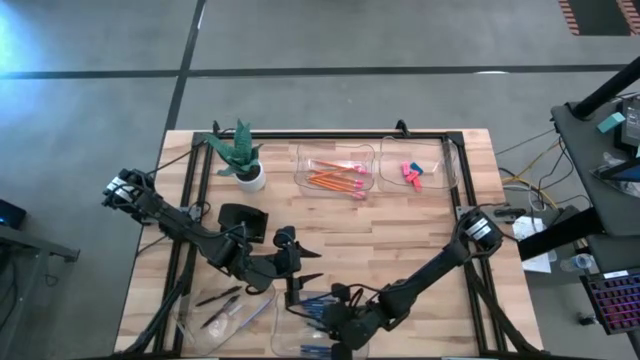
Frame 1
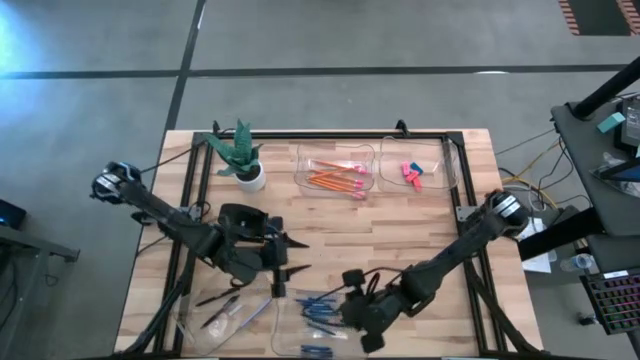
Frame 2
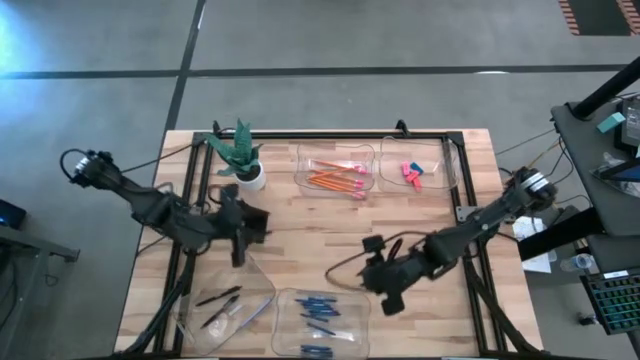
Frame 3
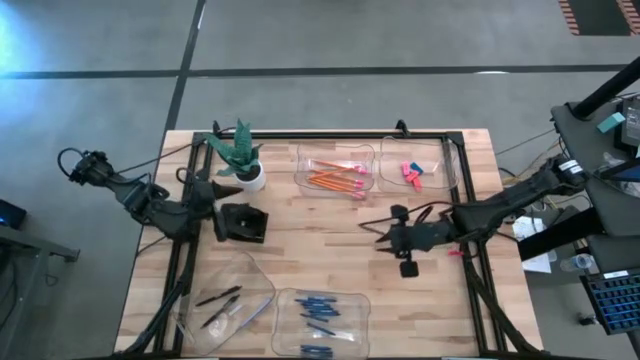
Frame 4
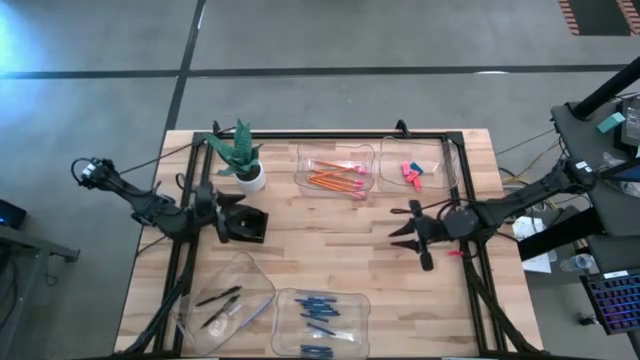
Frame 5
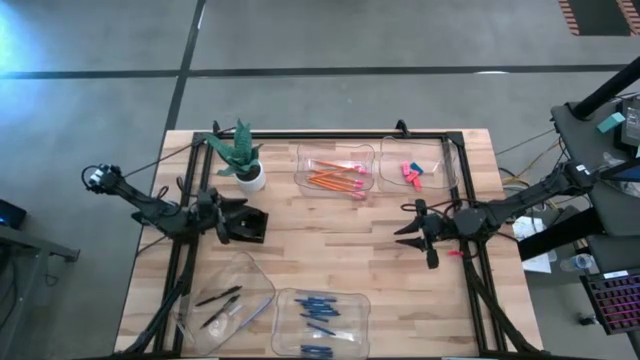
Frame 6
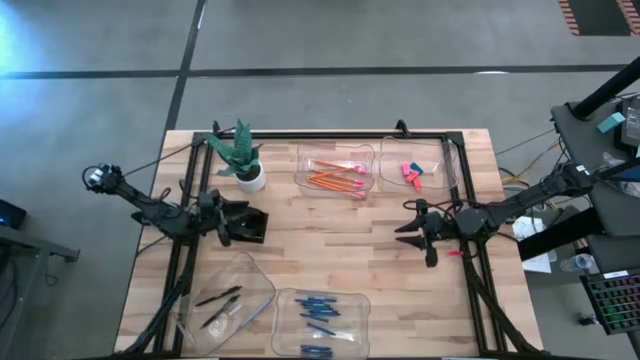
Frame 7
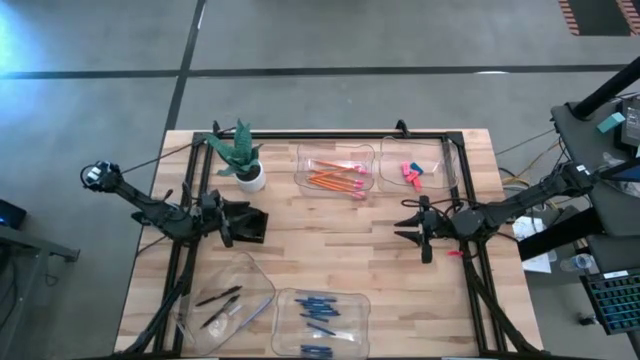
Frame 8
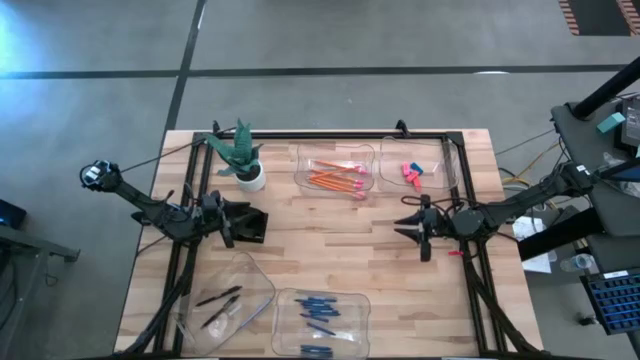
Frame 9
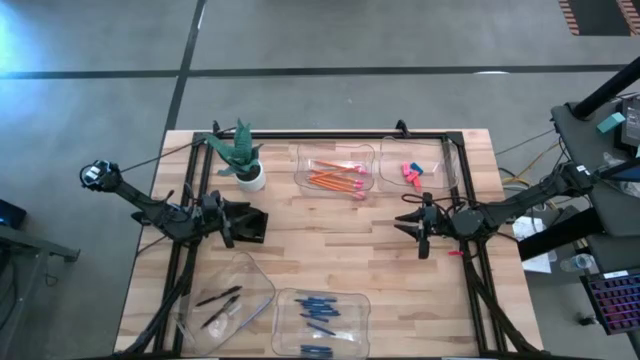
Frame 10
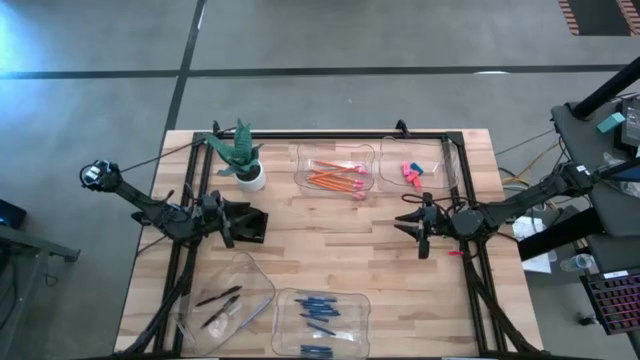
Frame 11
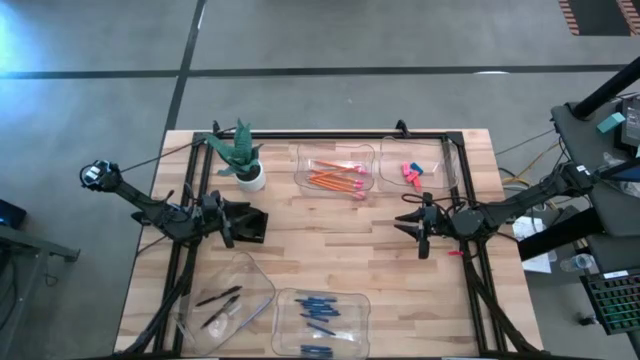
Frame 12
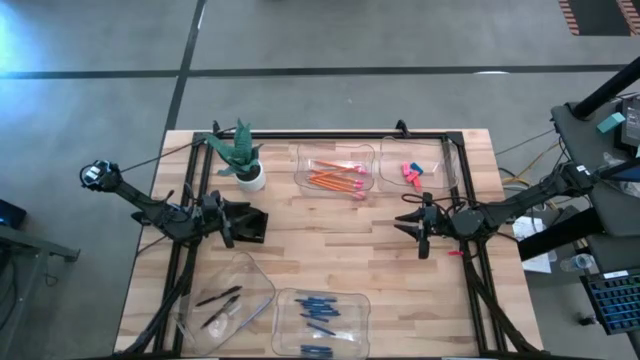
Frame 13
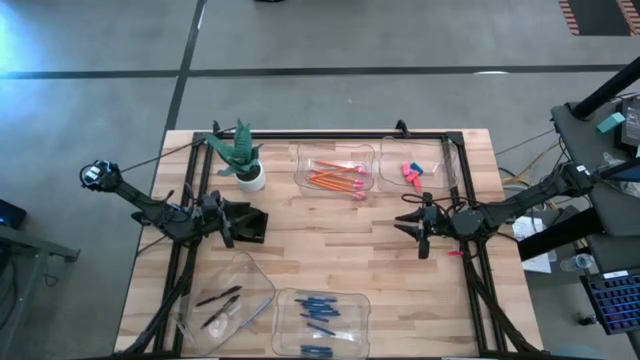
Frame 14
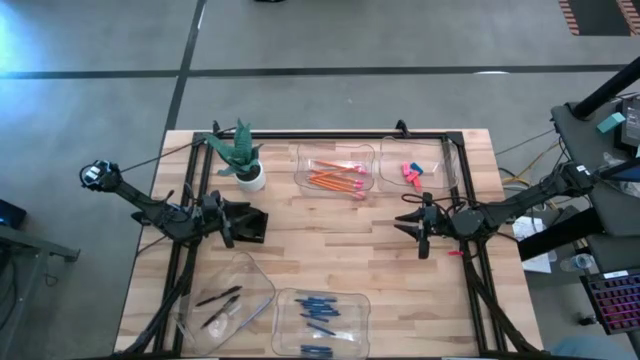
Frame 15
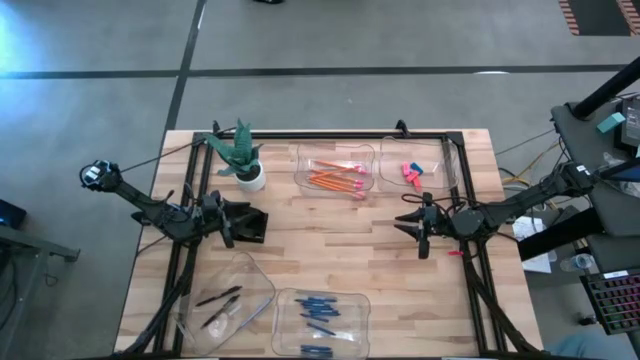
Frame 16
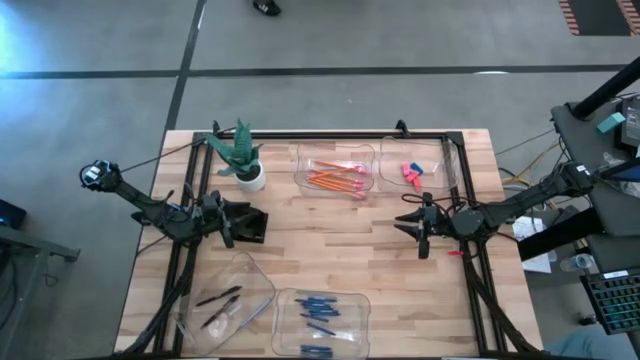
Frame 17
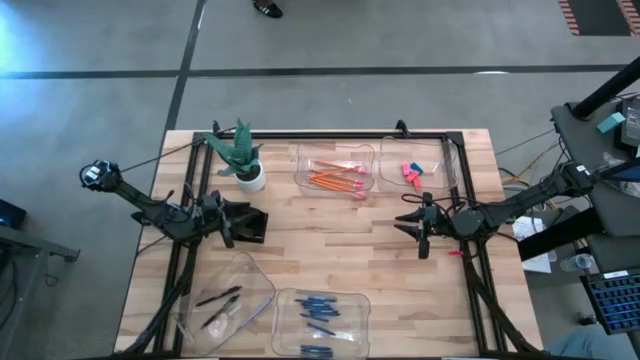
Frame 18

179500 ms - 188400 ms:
Task: Sort crayons/erasers/pens/pencils in bins
Return to Home Position

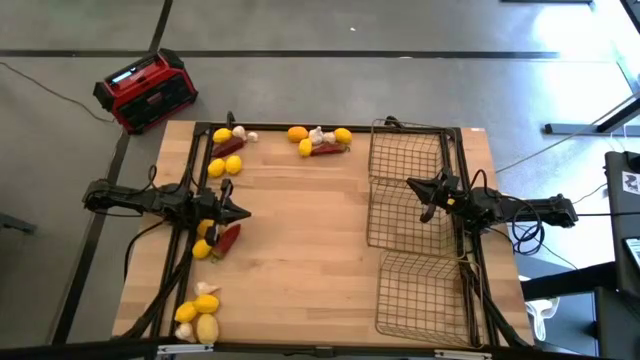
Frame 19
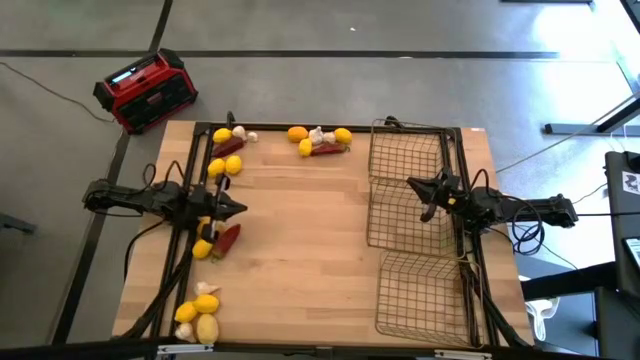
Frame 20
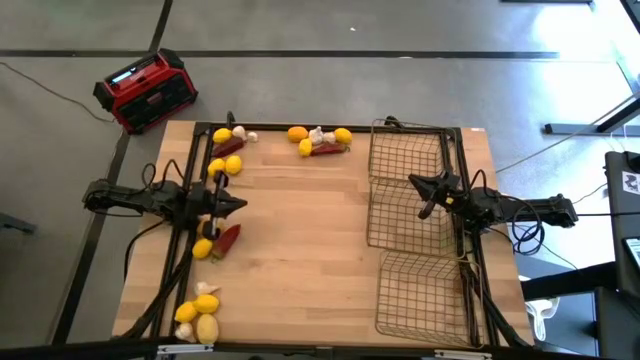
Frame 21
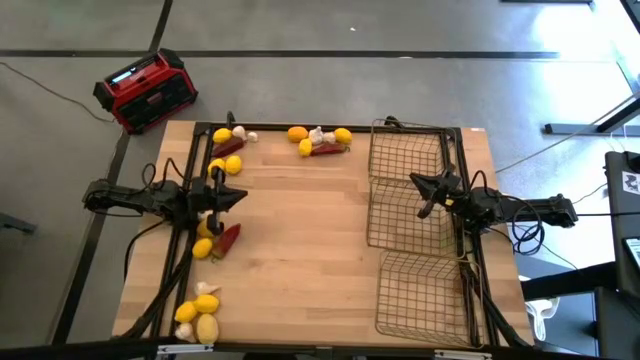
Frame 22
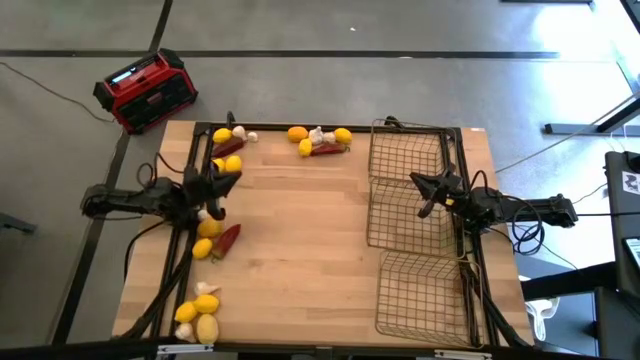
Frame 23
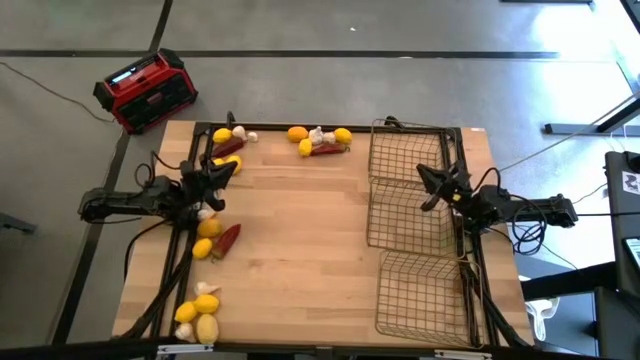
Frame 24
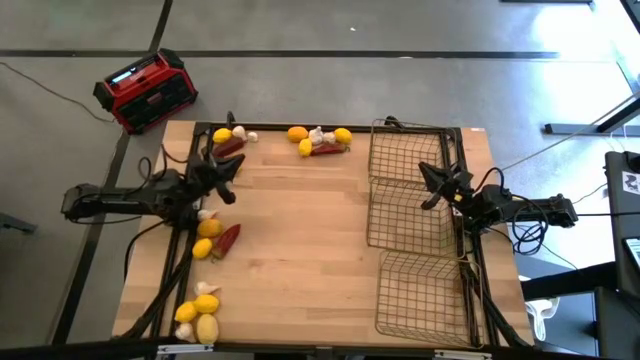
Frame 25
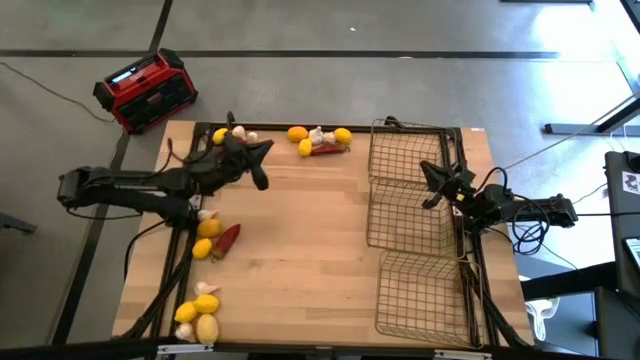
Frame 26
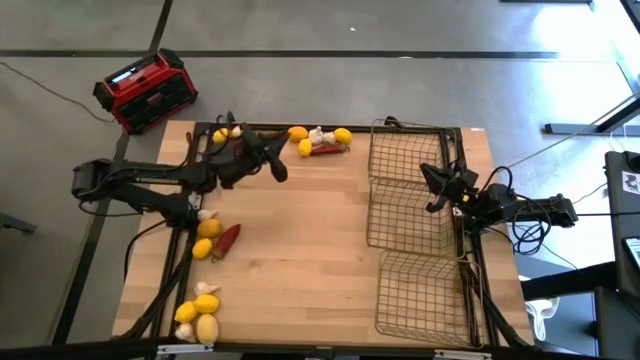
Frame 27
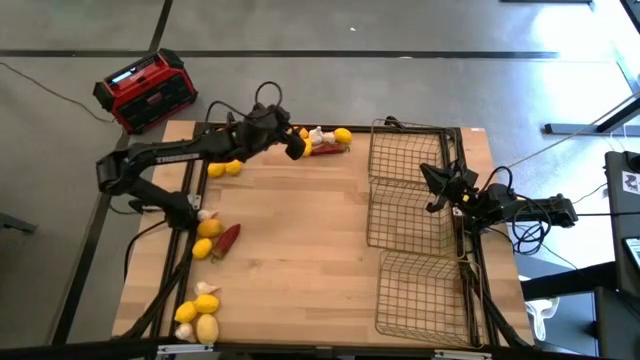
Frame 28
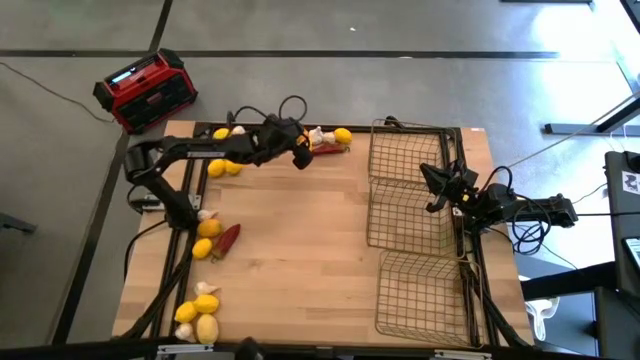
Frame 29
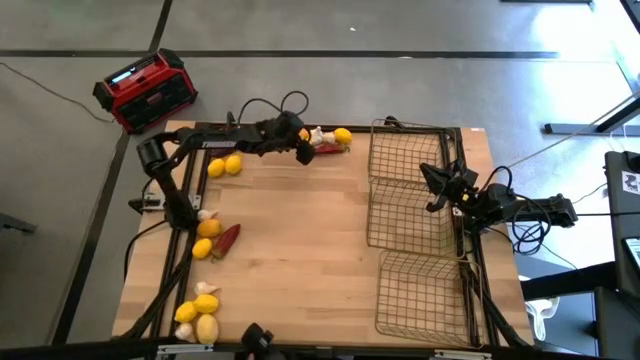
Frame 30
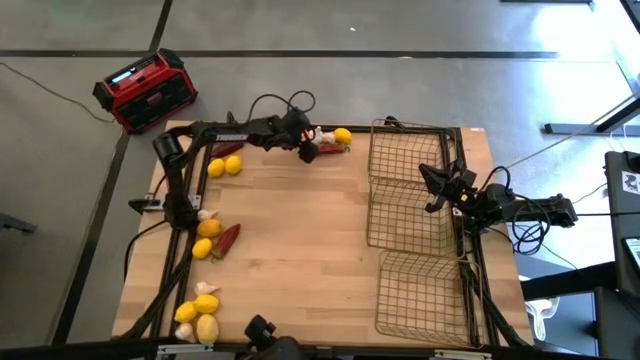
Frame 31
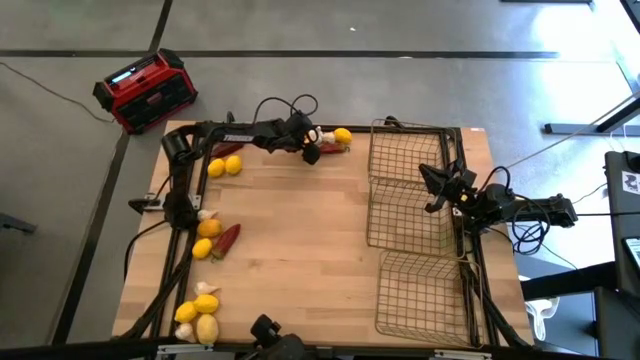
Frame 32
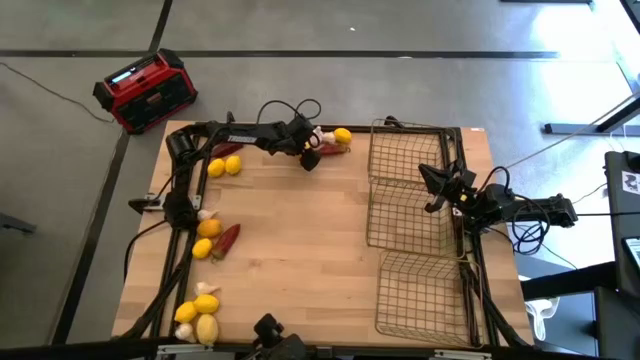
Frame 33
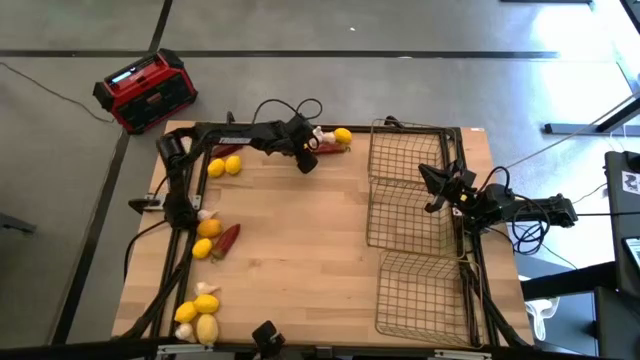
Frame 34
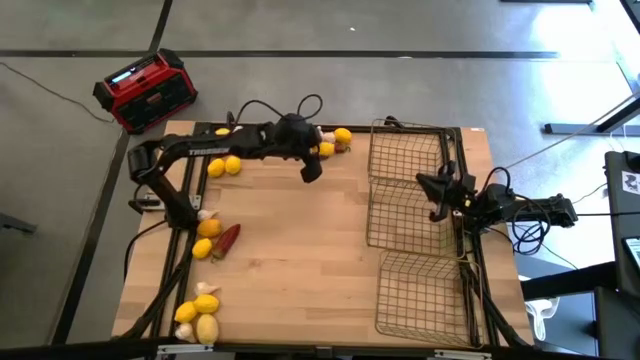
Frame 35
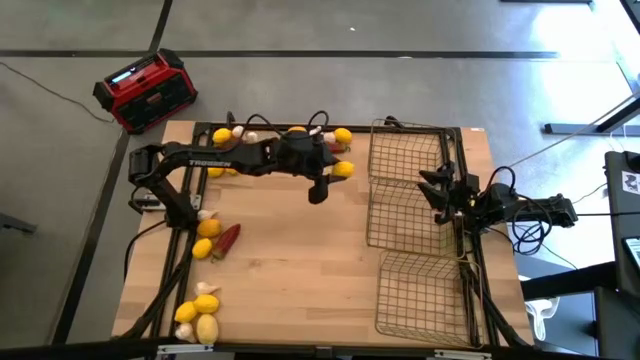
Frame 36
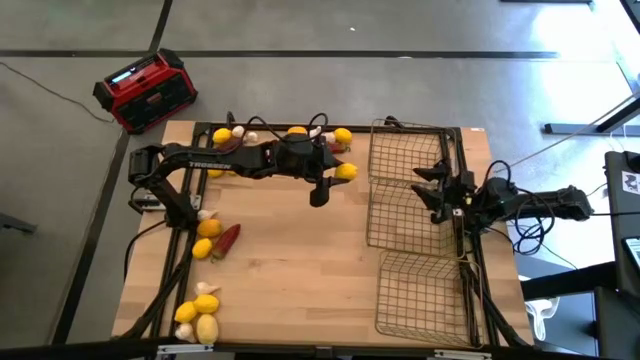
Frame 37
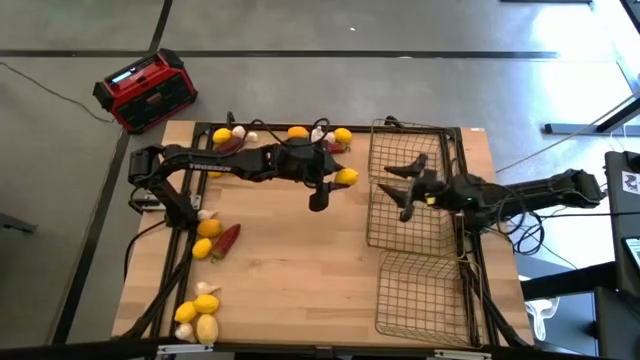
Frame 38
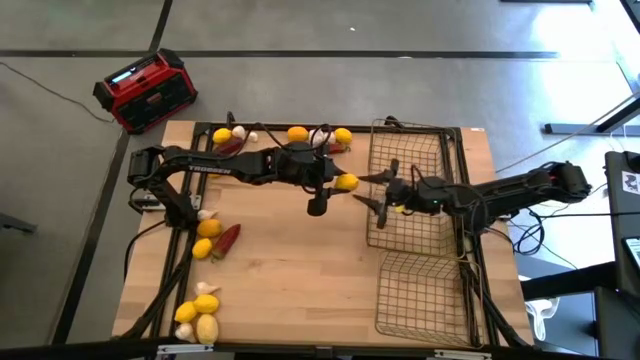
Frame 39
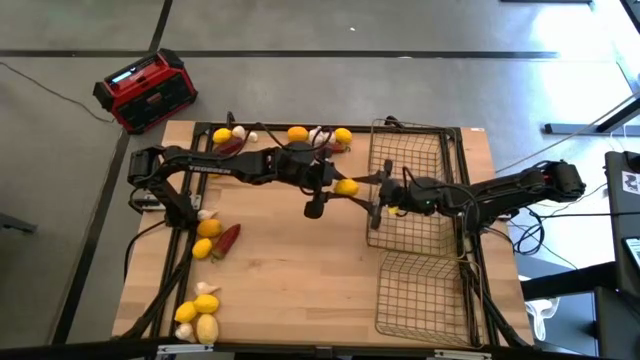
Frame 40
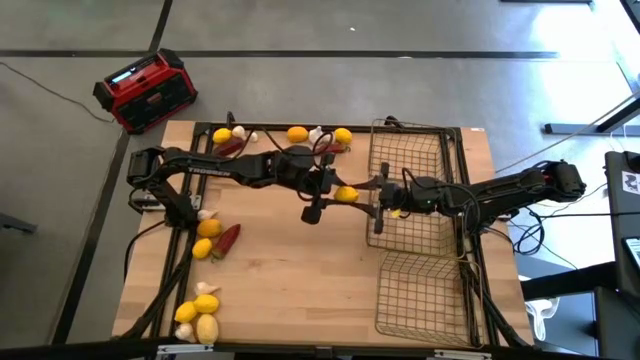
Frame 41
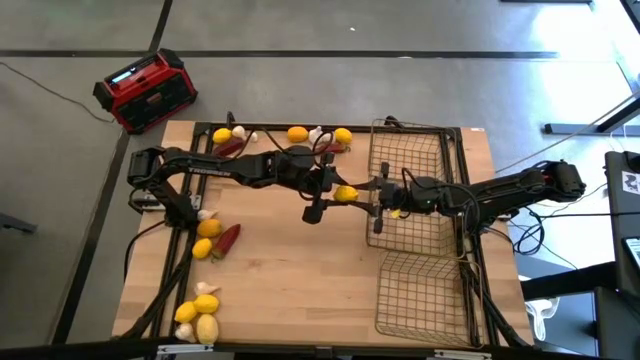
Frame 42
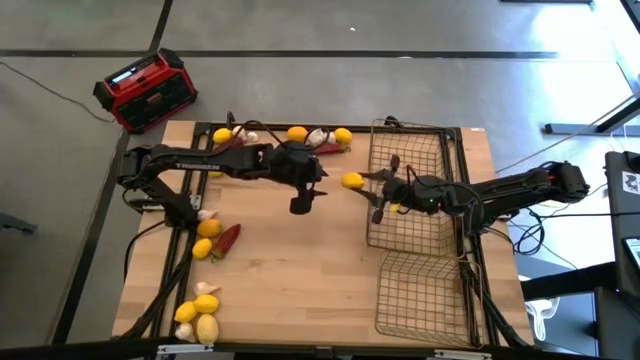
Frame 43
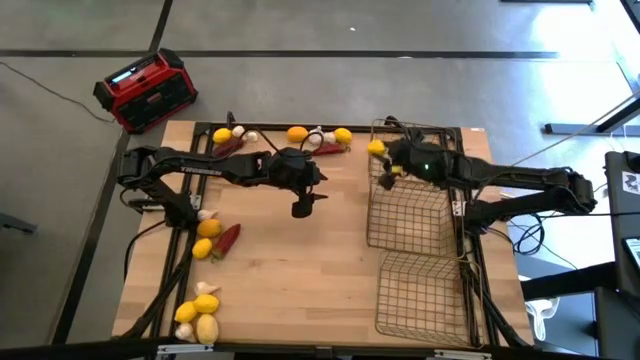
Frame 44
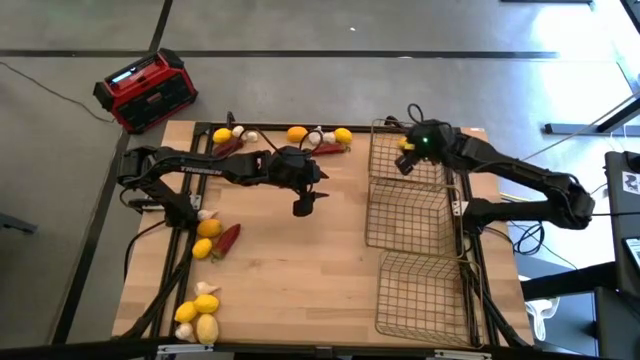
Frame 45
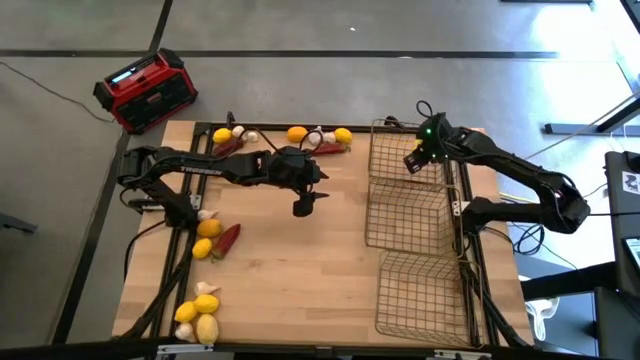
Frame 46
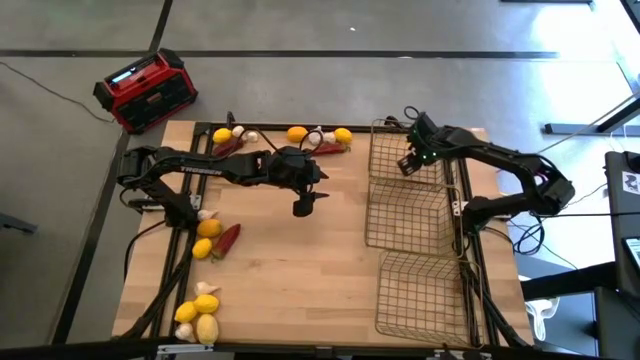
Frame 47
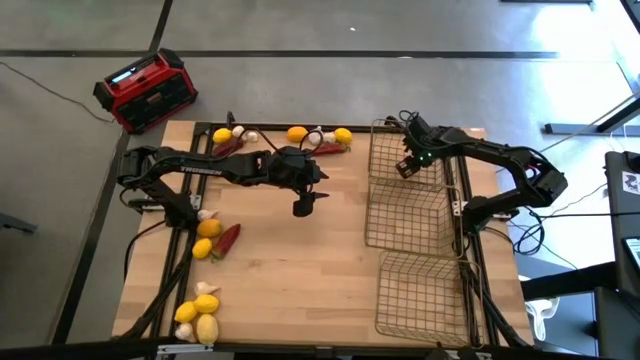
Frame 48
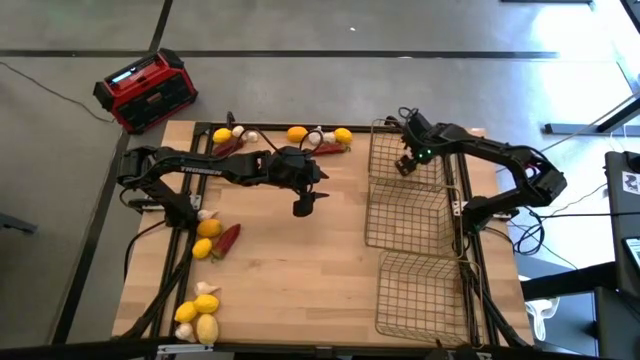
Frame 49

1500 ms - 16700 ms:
Task: Sort produce into baskets
Put the yellow lemon into the top wire basket
